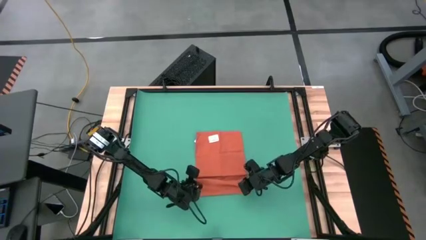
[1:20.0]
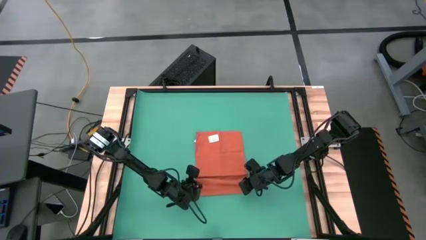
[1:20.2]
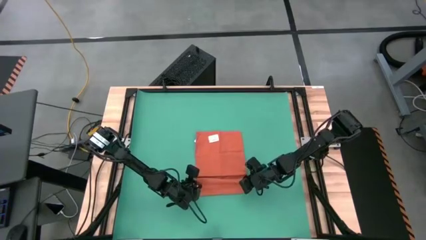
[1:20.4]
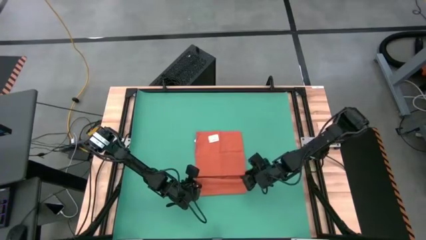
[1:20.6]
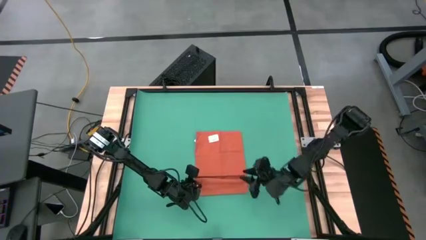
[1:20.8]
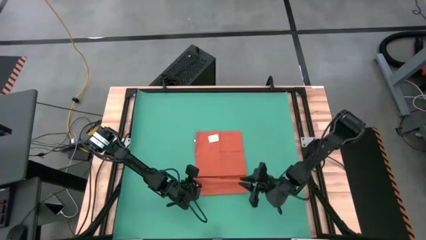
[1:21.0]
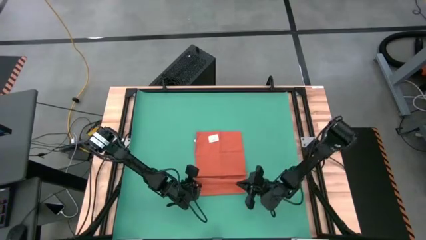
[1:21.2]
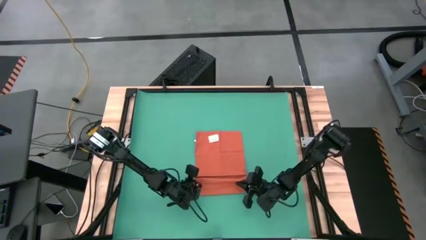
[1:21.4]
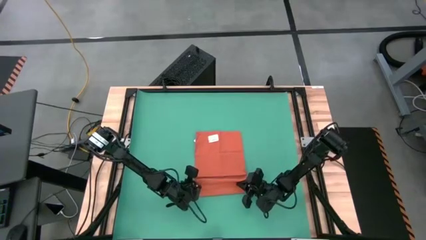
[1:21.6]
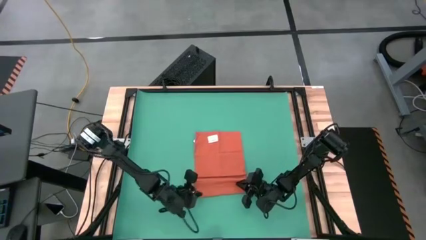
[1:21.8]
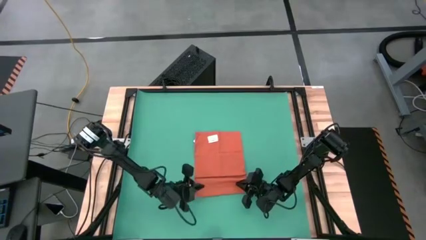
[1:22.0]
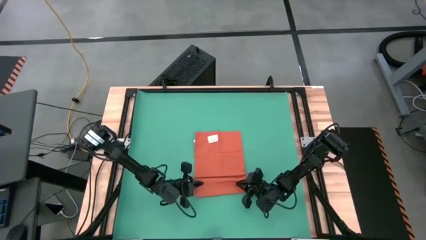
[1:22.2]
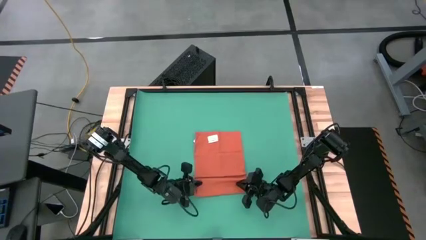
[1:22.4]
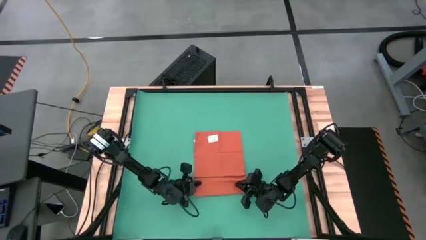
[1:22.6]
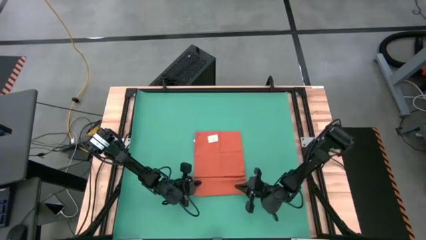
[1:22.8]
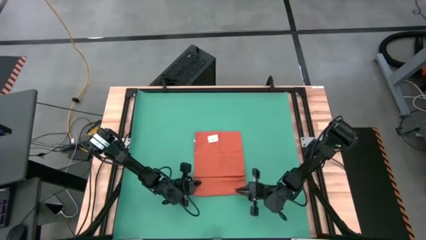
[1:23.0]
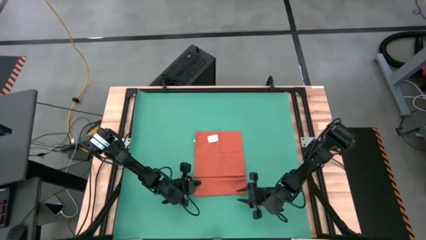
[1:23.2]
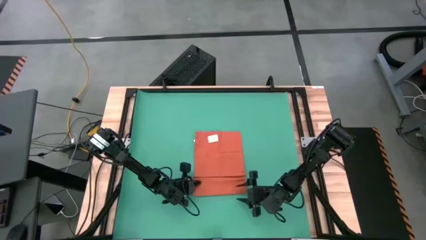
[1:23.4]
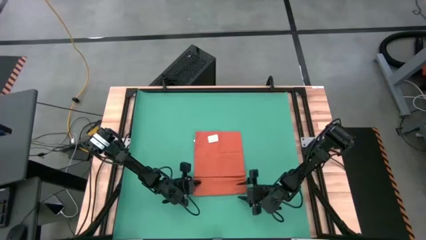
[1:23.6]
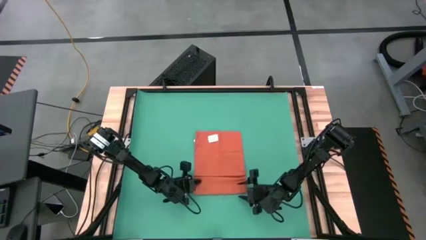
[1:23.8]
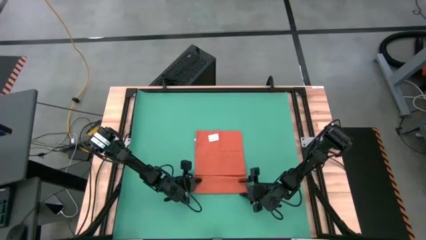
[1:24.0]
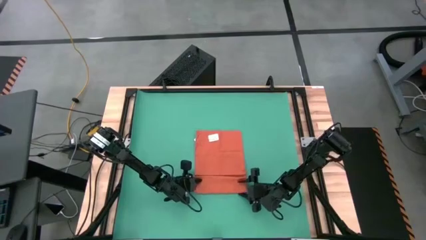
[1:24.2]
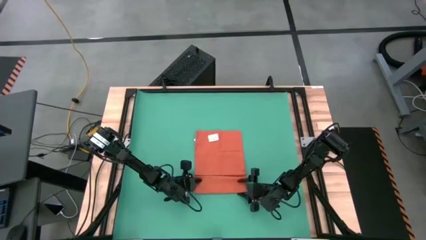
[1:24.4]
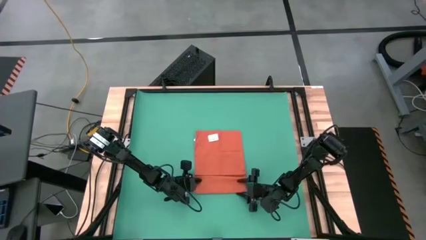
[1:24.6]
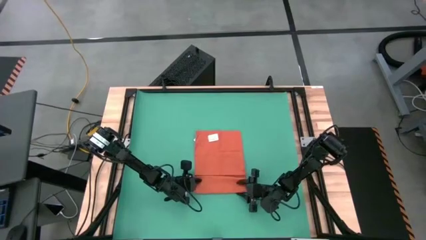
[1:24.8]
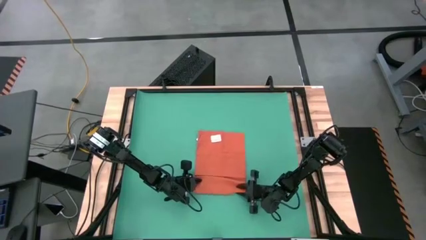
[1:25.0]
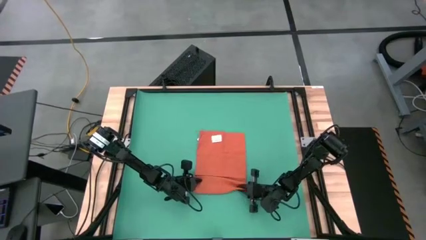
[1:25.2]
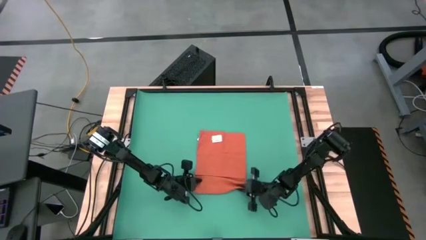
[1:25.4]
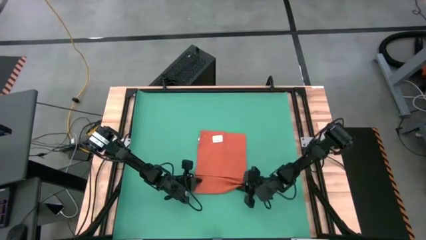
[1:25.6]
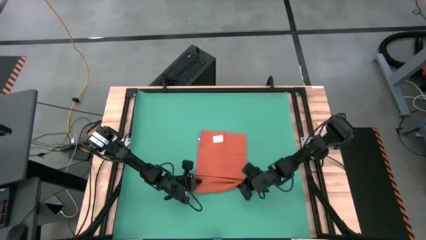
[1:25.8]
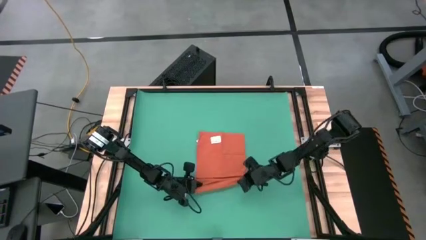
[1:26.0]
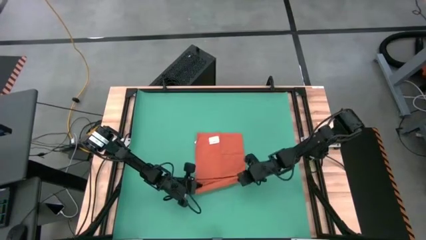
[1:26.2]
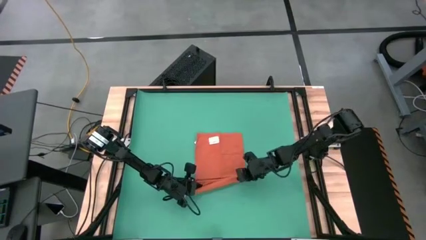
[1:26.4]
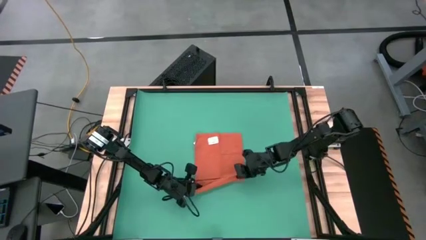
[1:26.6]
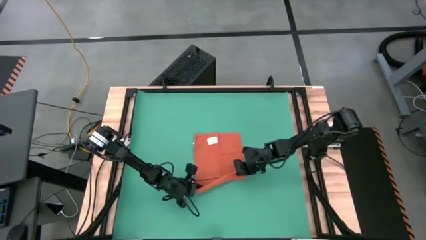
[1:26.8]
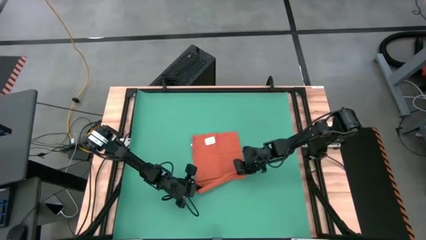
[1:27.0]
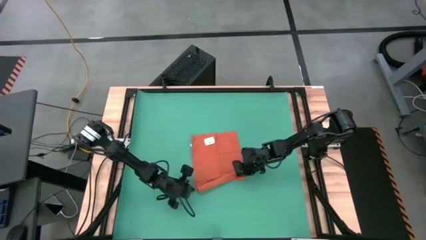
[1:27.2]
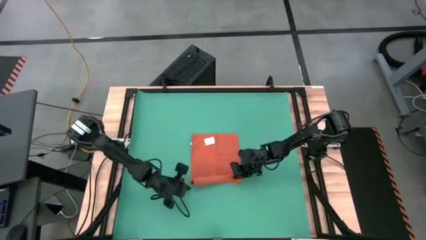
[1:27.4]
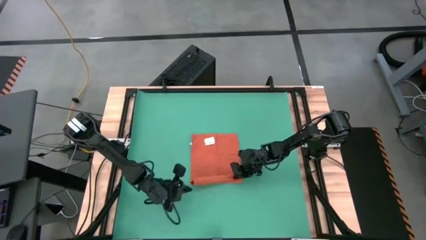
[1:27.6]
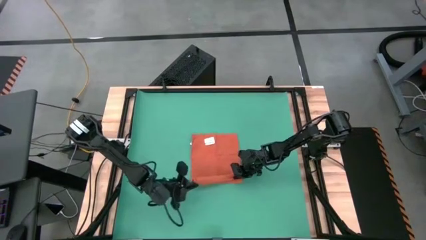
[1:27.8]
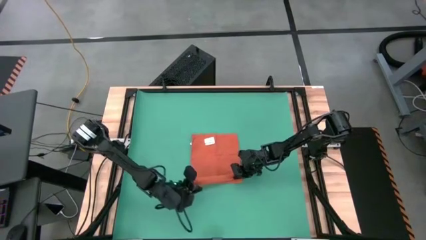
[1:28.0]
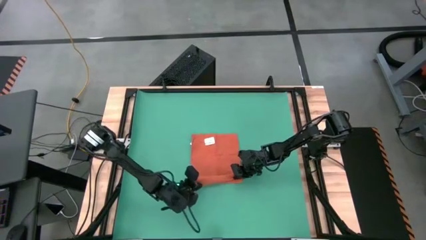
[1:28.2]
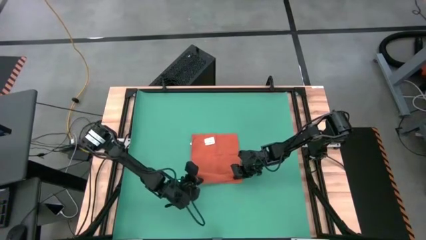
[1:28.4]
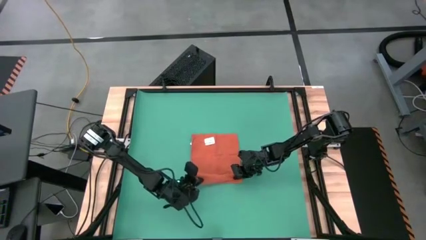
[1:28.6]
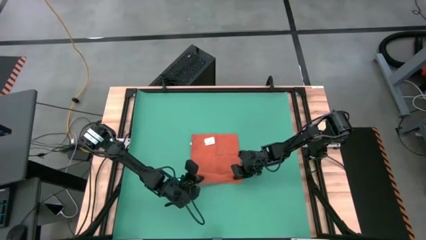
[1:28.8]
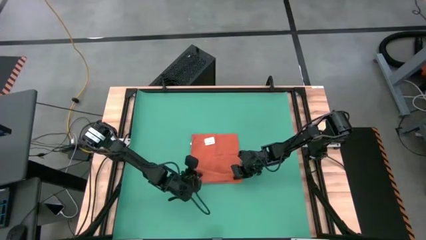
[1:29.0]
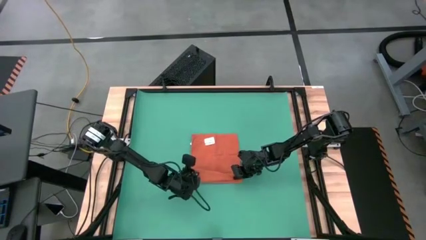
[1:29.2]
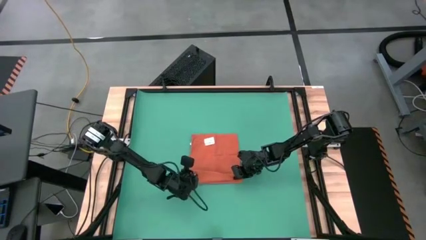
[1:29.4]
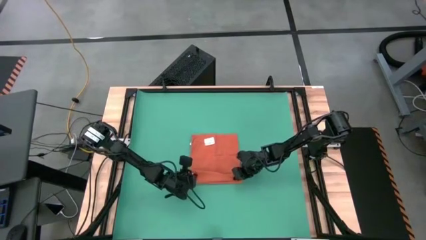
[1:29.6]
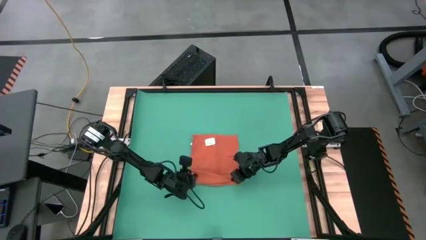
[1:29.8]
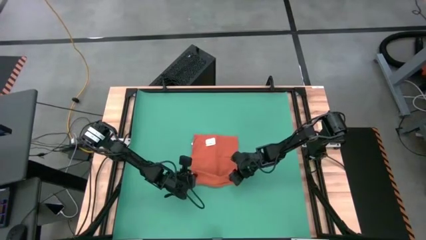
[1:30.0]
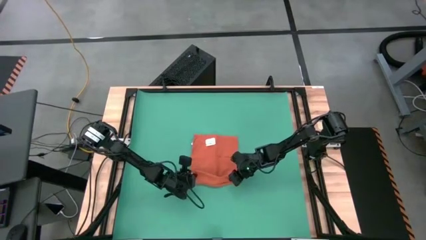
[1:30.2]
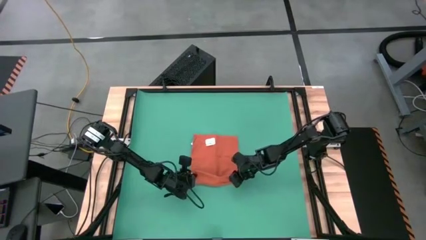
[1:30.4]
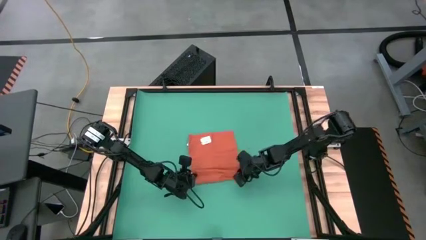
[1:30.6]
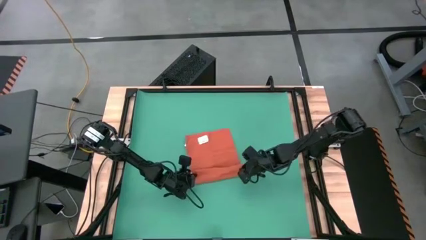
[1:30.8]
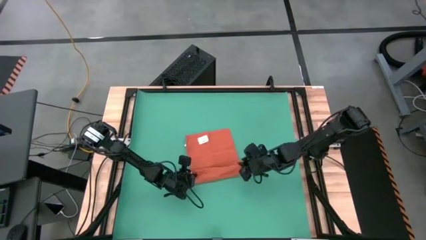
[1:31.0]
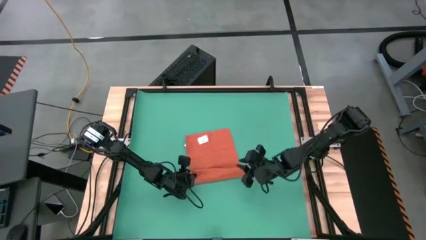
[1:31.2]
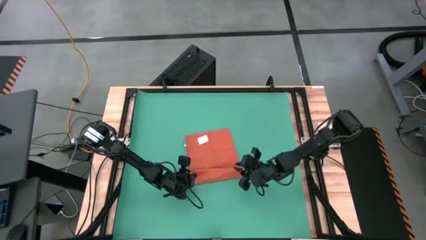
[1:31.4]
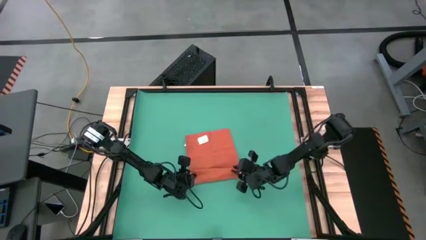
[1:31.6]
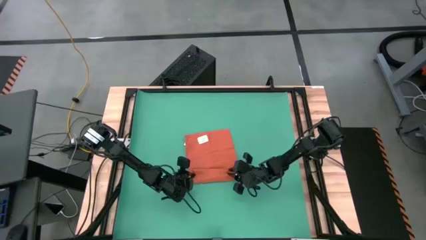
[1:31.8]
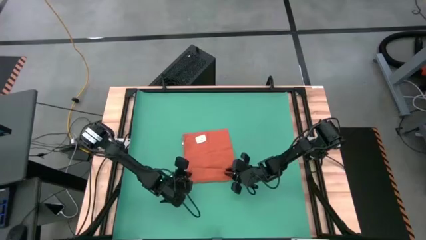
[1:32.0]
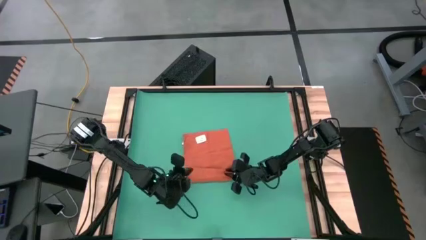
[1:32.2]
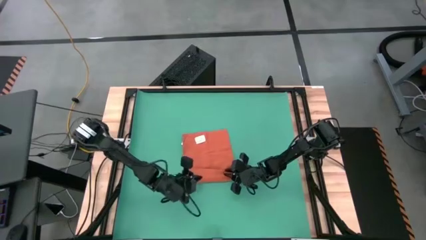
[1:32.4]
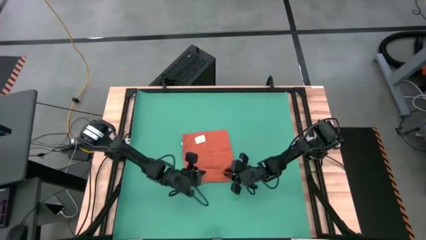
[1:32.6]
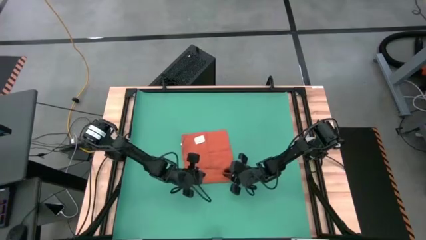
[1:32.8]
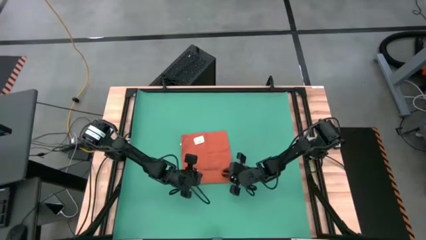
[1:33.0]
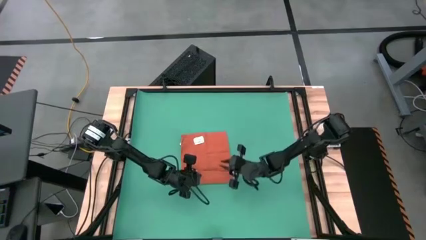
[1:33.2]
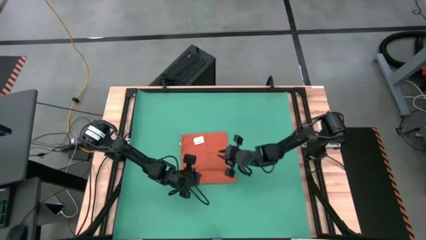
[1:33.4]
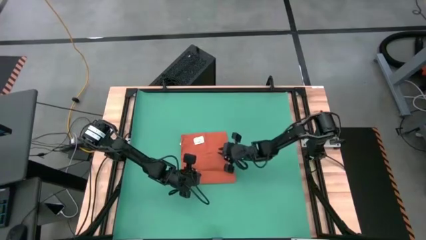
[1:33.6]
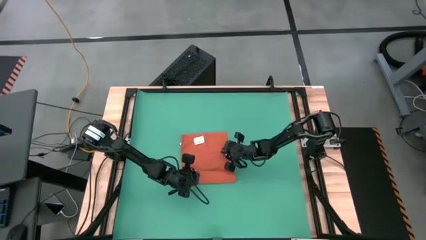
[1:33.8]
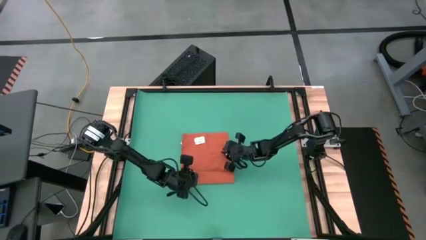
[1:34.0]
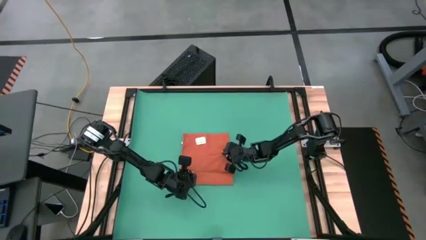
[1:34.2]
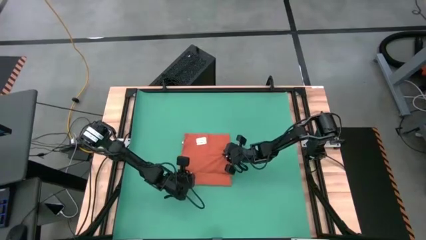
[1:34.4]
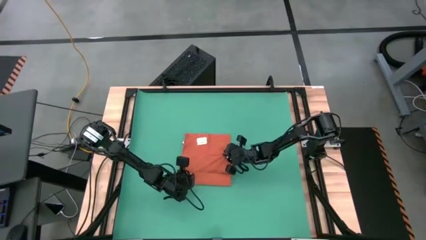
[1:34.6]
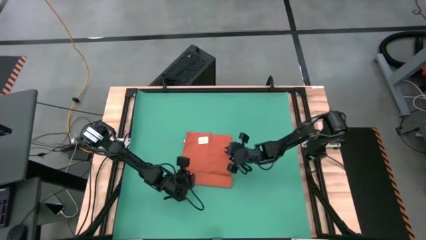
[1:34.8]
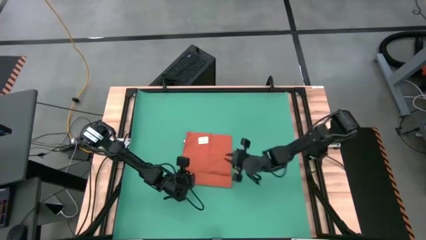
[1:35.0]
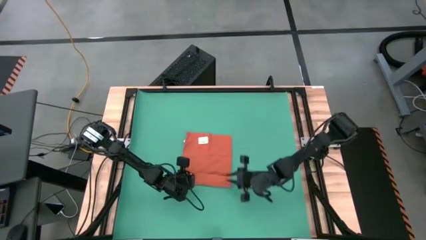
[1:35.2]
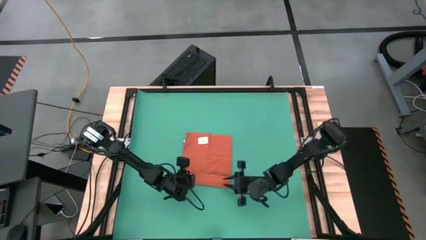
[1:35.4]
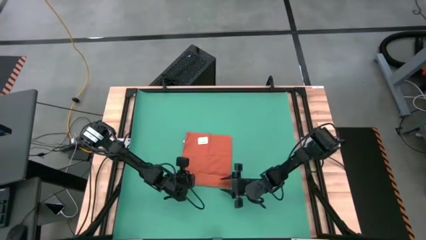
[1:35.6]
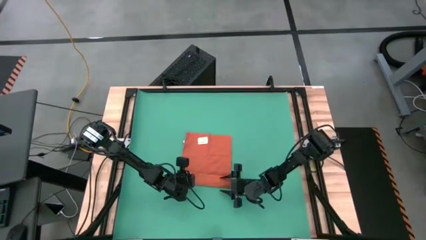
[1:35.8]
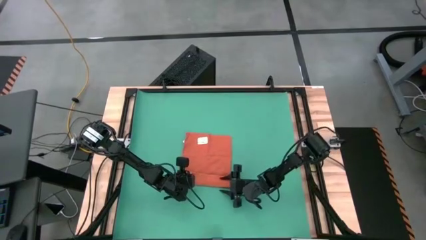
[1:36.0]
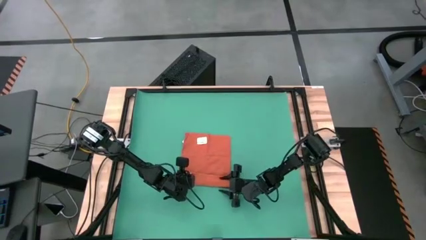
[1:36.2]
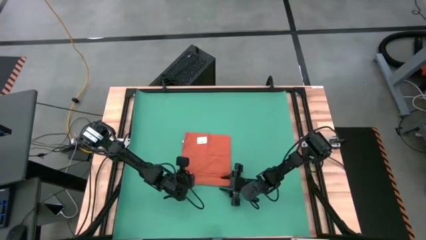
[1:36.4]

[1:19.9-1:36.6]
Task: Roll towel into tight, uniform cylinder
Roll the orange table napkin
